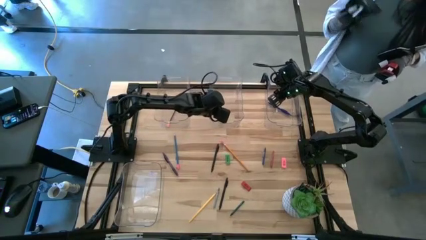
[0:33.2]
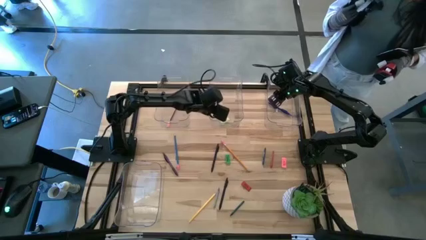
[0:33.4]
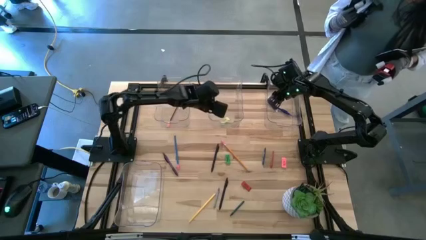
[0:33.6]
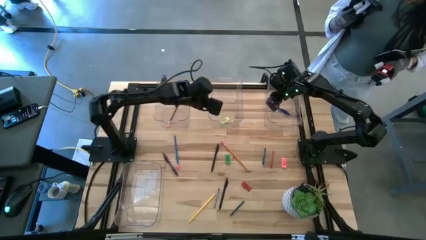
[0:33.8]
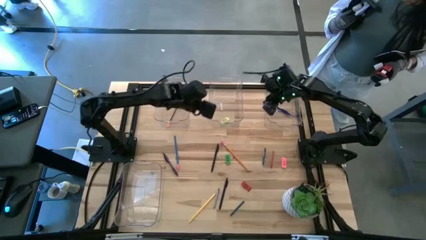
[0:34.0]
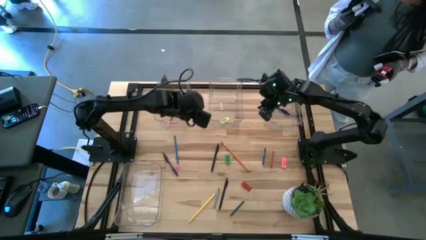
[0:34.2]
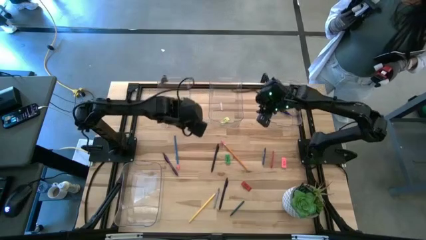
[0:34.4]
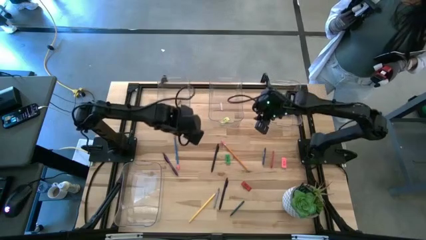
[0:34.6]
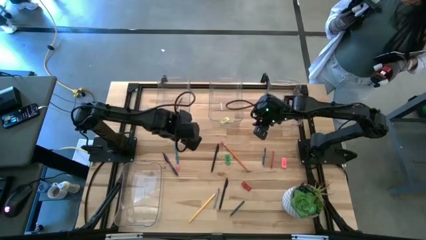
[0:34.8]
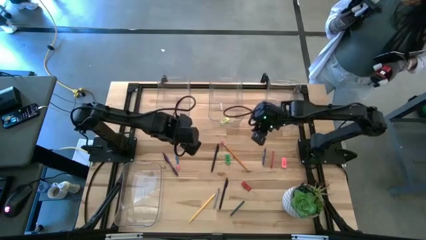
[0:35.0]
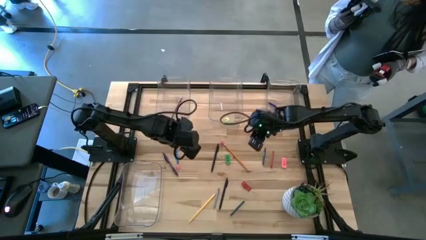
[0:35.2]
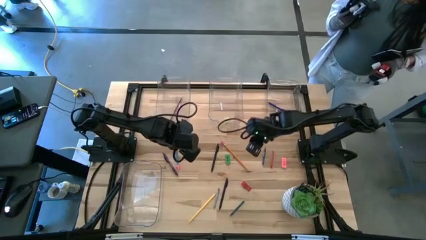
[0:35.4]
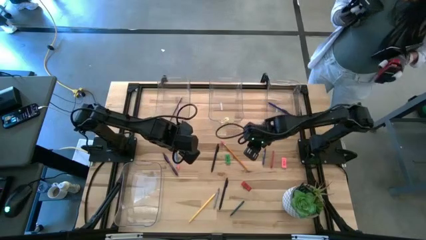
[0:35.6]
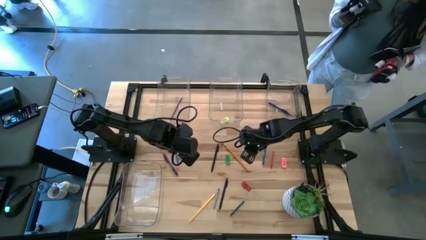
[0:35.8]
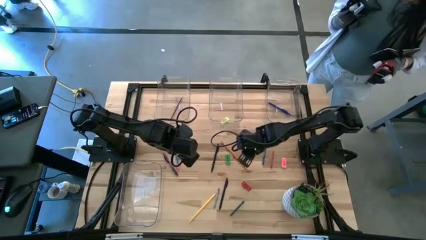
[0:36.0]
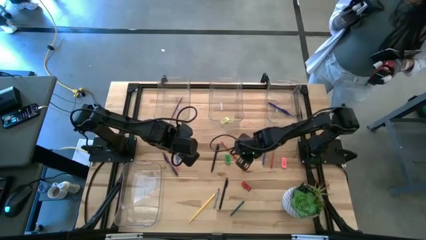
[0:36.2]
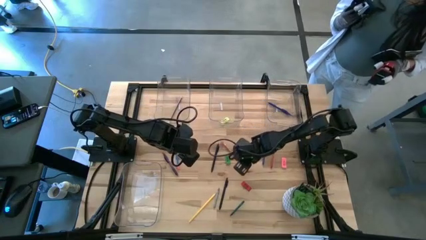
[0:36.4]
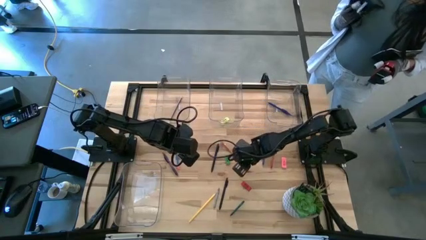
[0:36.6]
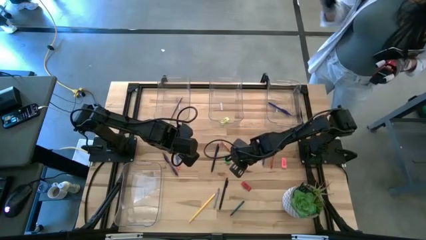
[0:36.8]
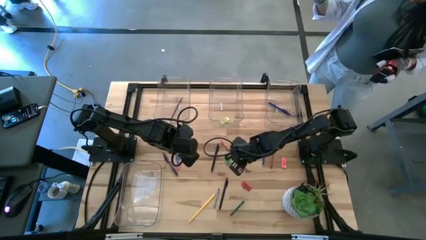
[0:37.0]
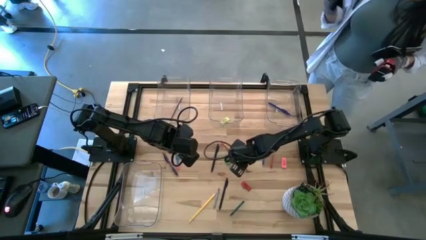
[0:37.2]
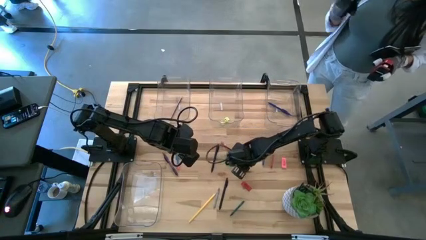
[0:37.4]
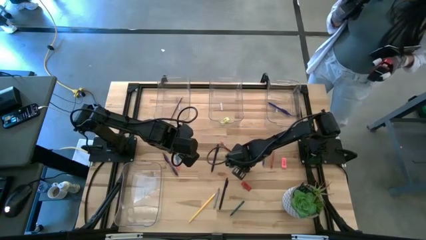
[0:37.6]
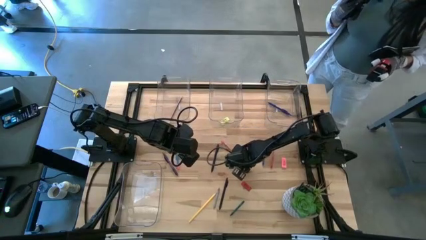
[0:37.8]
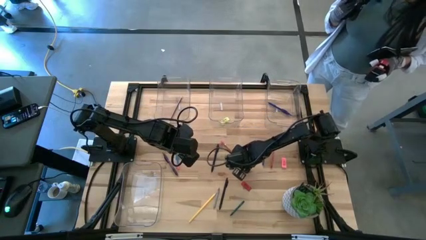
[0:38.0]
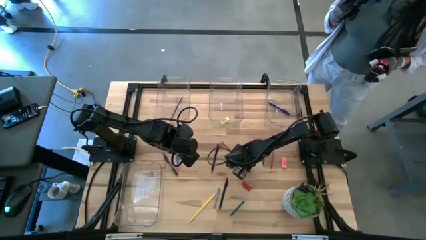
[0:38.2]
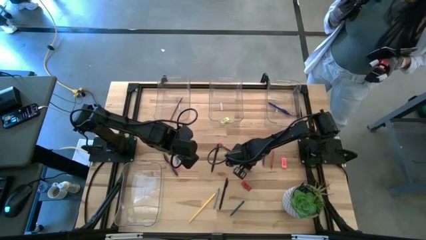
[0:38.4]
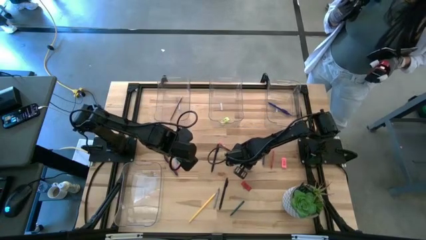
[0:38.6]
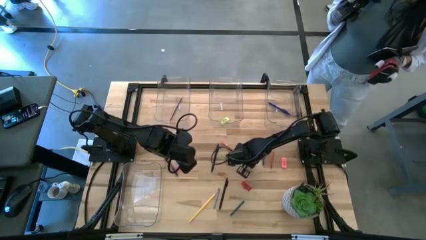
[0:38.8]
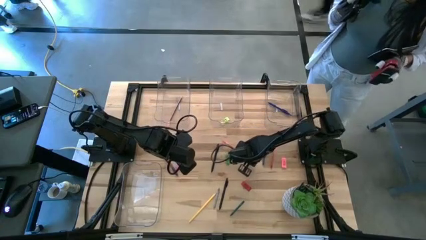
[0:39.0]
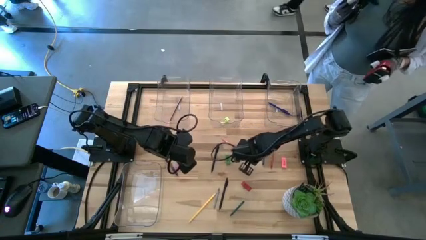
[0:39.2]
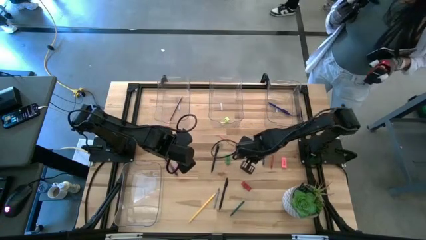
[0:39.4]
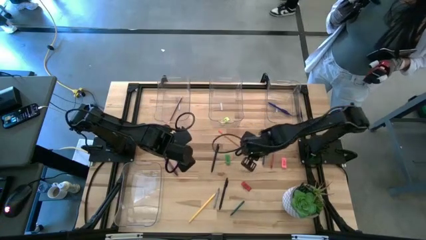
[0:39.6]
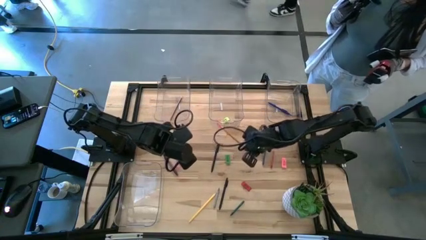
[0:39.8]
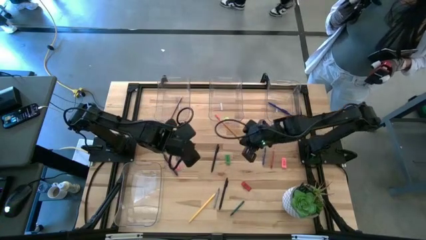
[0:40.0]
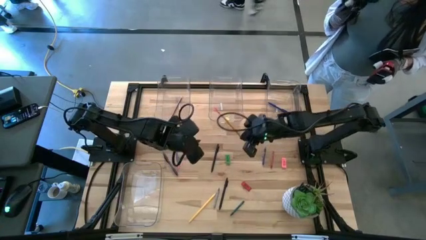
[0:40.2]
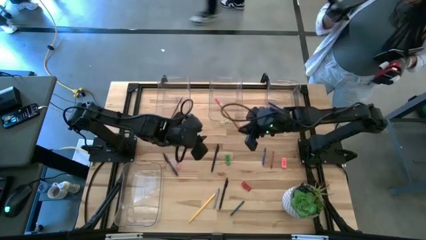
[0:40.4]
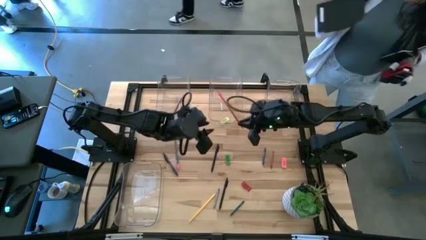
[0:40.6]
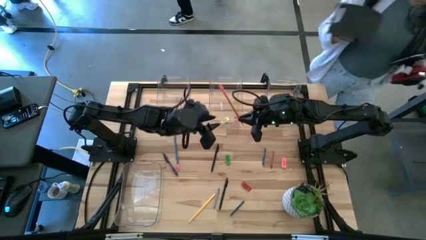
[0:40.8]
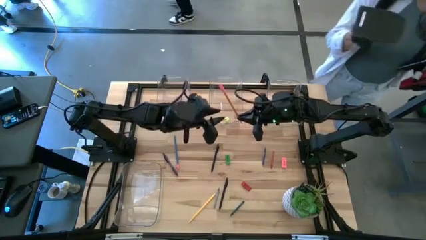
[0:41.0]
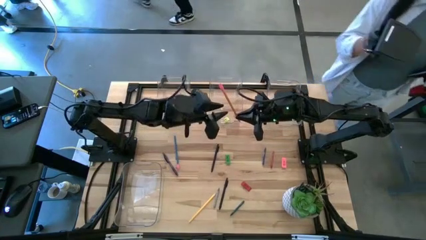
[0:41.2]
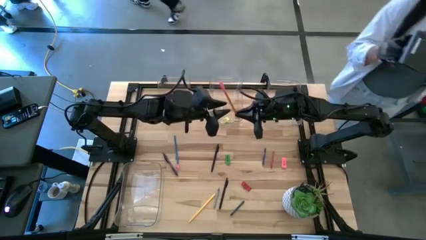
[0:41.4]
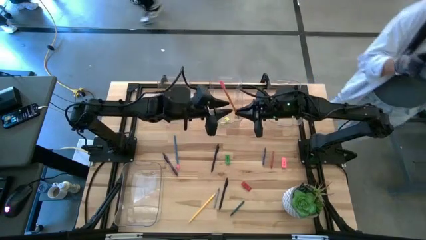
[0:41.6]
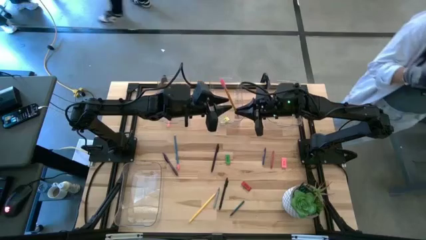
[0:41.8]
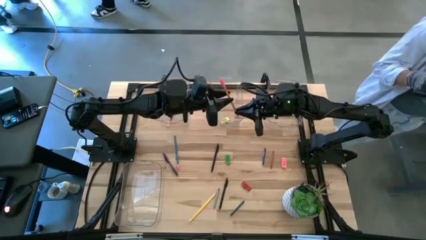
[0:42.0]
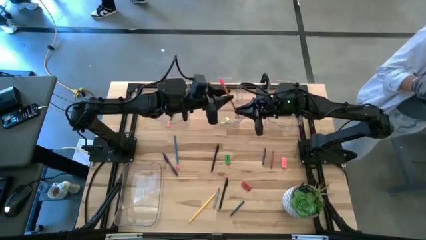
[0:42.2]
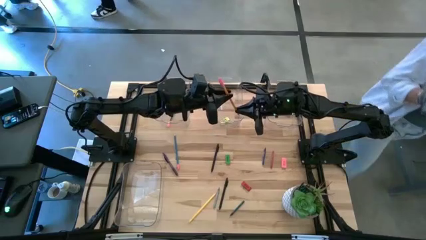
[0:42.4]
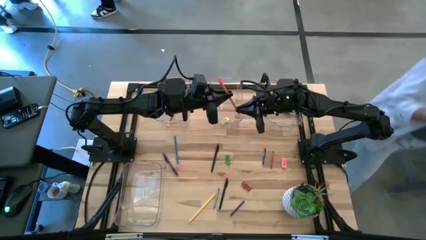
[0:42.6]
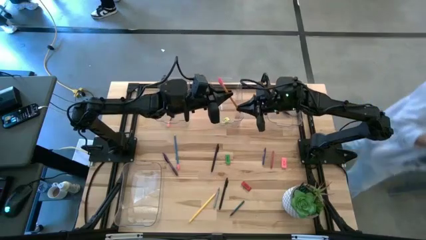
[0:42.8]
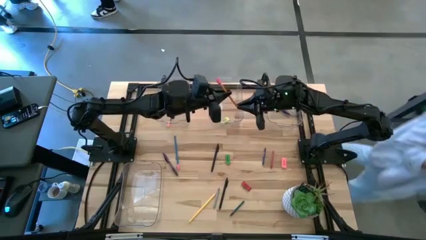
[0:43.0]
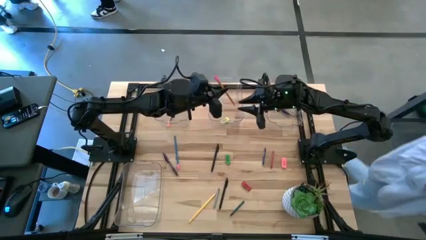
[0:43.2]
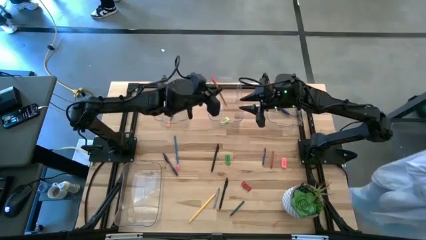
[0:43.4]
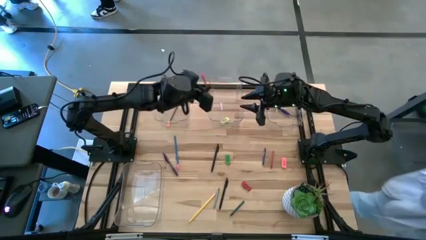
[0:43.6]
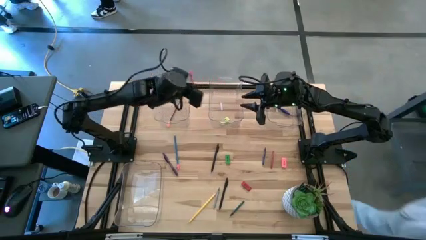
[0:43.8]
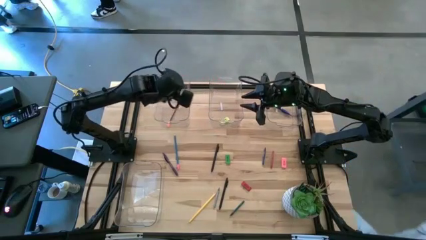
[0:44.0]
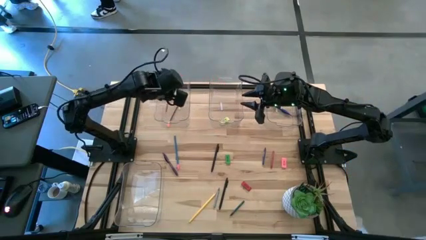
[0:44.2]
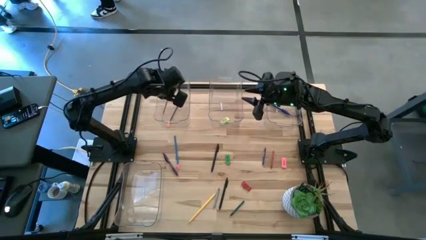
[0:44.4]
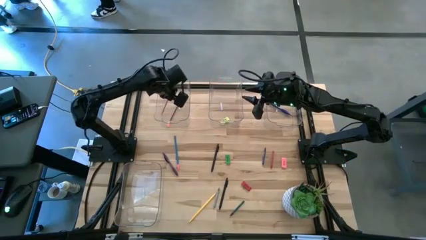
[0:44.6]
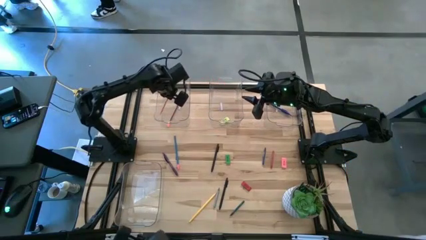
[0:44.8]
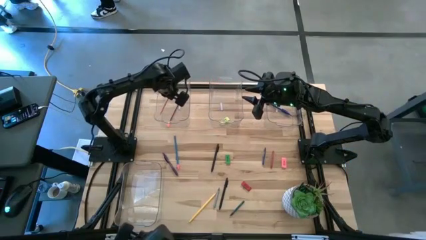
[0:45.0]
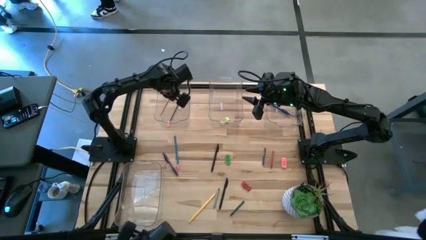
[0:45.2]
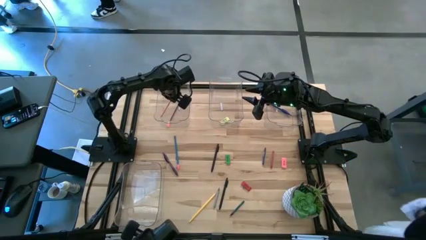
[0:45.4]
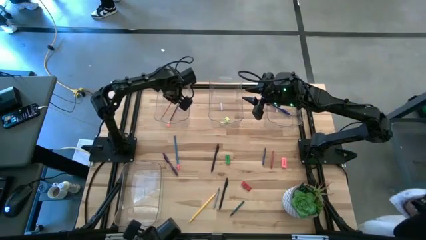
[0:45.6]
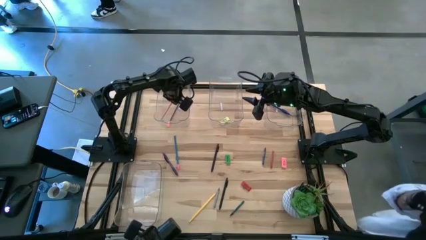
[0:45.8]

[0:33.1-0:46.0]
Task: Sort crayons/erasers/pens/pencils in bins
Put the orange pencil into the top left transparent bin

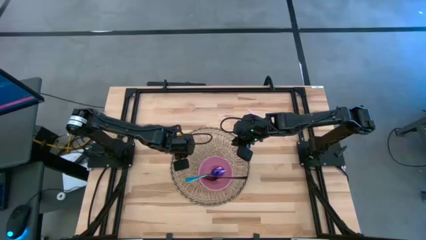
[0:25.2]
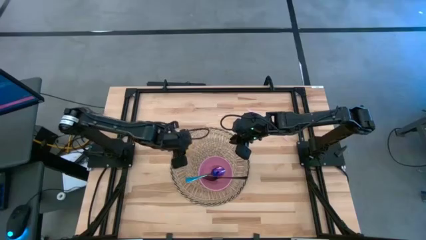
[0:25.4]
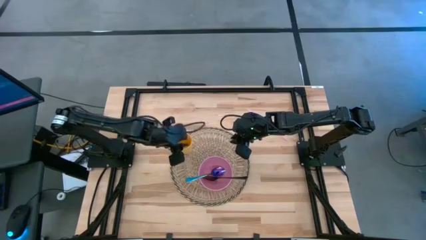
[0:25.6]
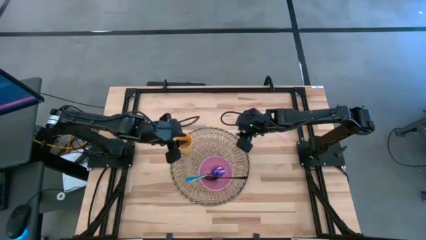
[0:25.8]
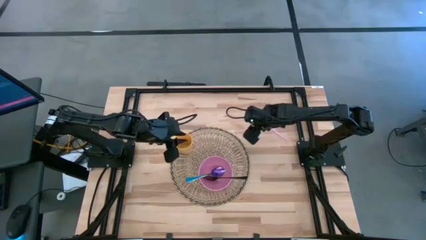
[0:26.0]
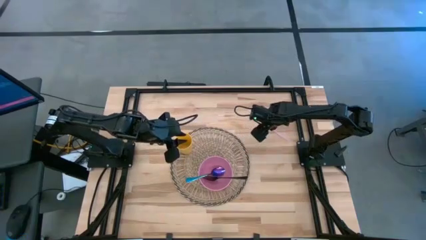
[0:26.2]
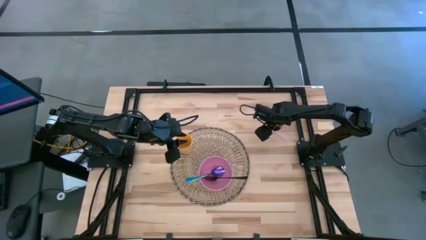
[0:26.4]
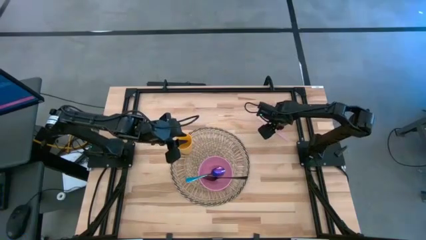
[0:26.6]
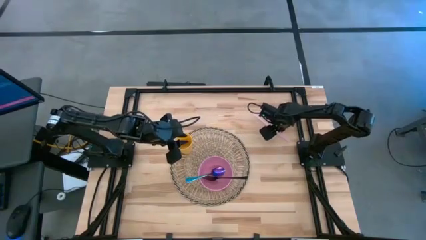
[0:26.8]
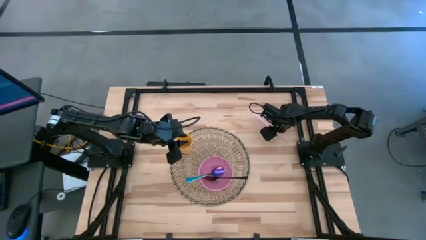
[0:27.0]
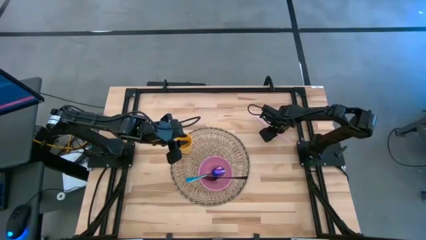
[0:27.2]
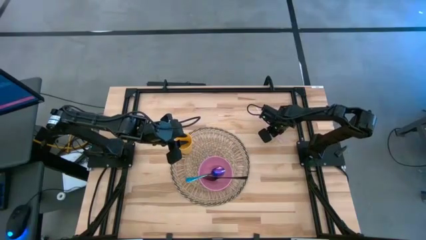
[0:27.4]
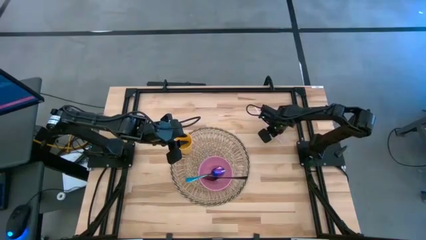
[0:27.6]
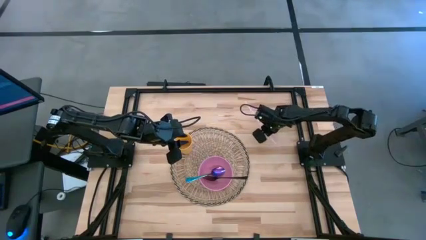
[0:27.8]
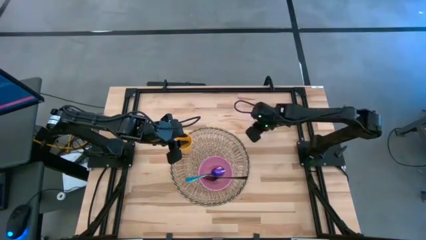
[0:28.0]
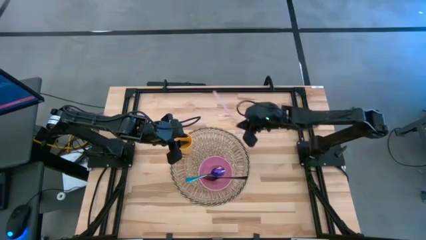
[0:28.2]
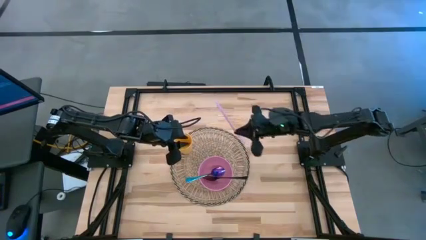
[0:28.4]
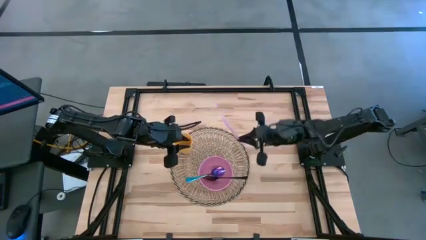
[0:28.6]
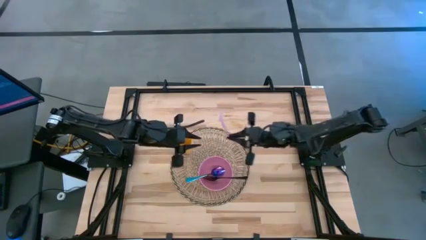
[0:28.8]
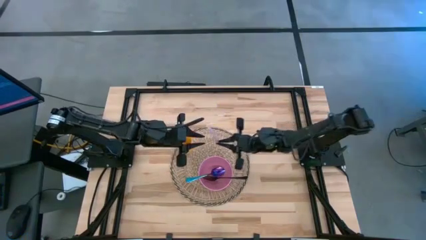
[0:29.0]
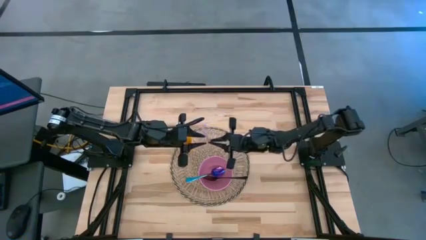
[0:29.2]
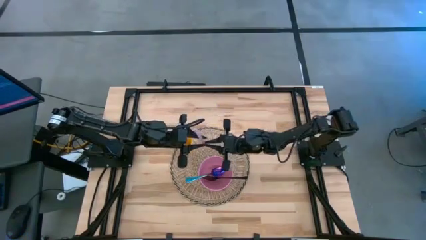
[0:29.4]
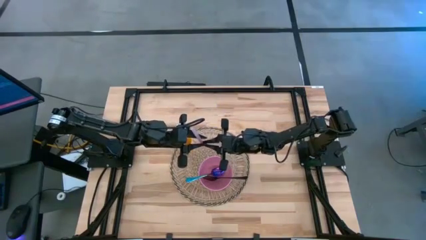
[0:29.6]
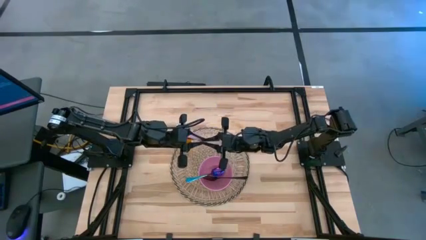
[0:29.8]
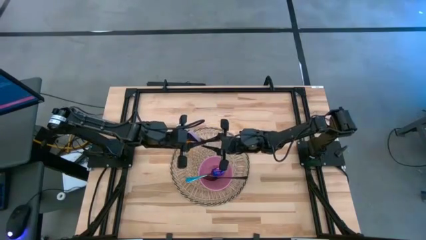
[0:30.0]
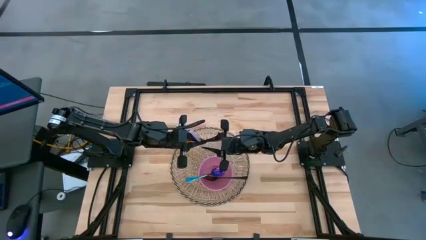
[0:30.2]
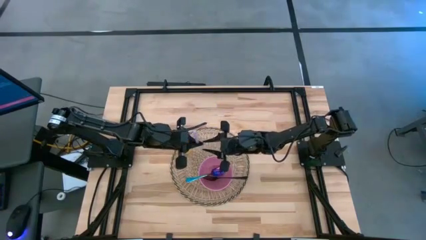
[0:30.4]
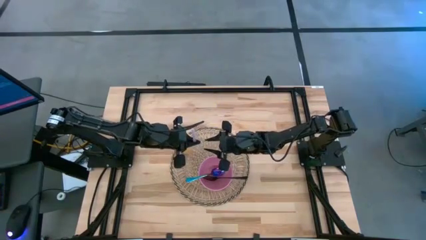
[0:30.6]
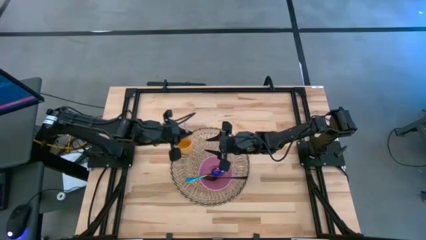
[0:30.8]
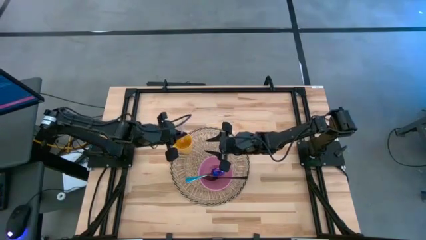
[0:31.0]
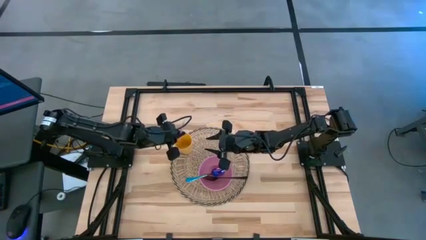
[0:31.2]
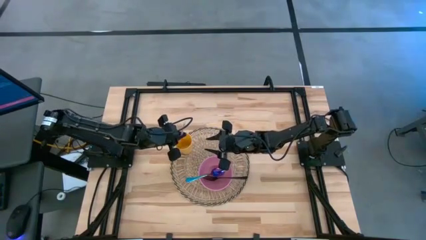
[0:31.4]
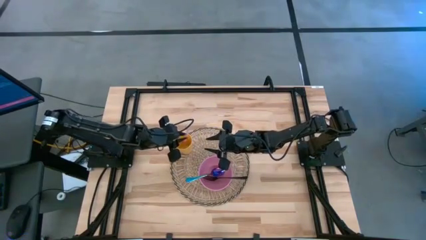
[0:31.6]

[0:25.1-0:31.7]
Task: Pick & Place Utensil
Put the pink straw into the yellow cup on the brown mat
